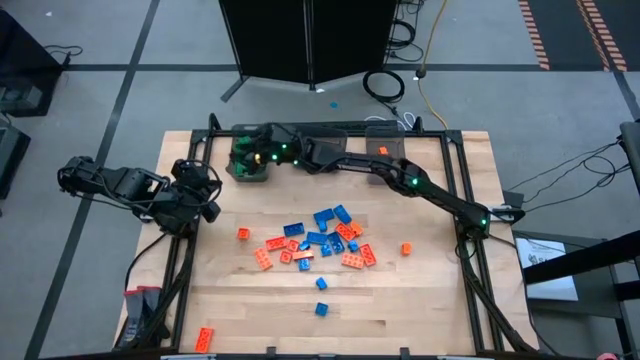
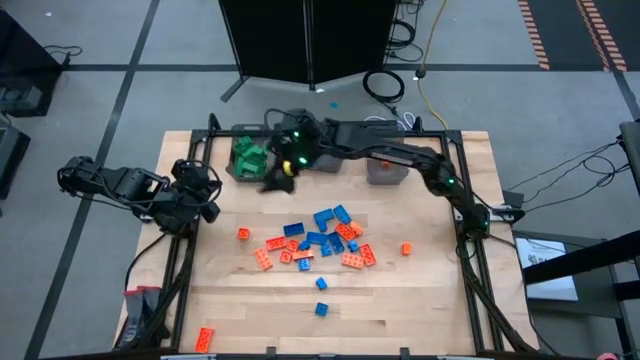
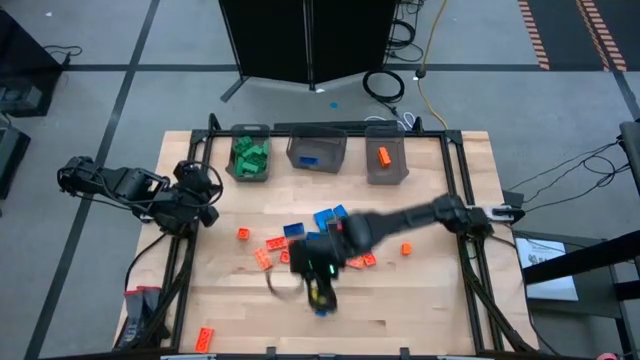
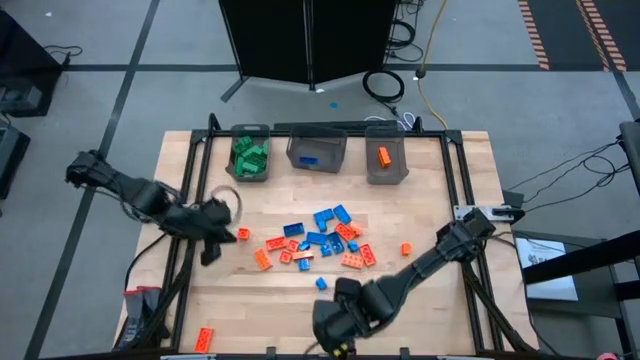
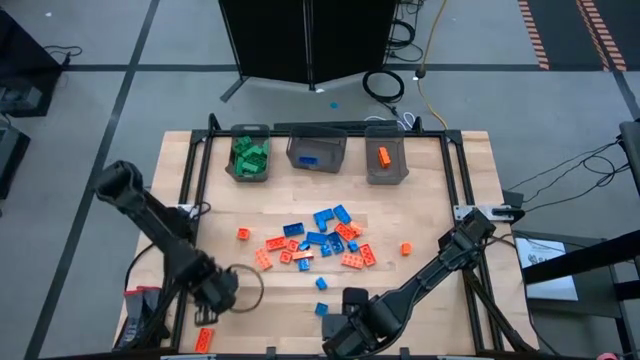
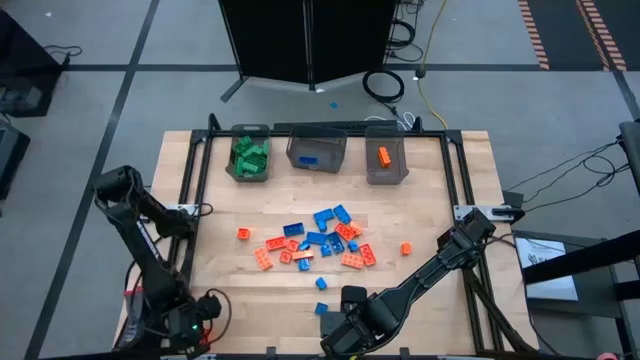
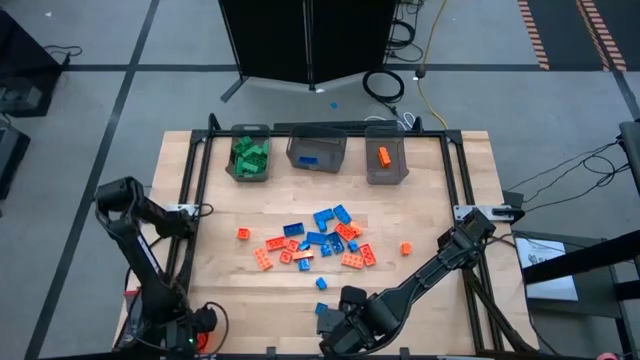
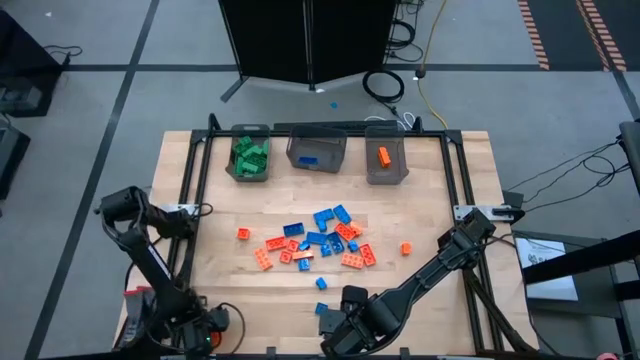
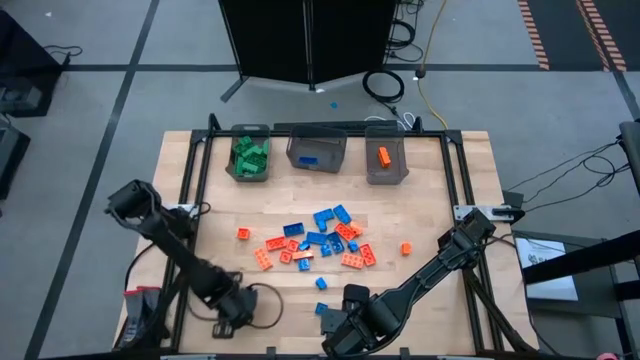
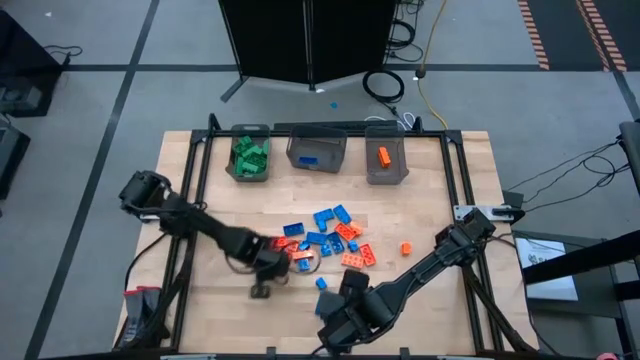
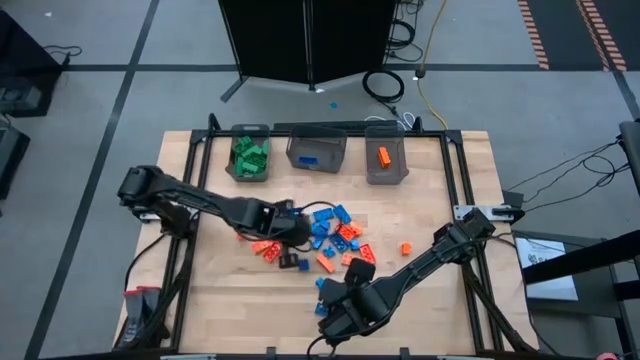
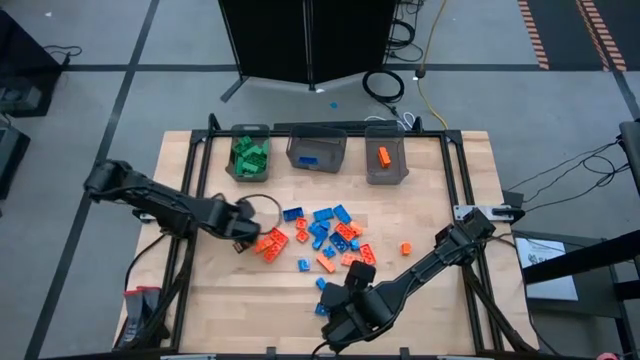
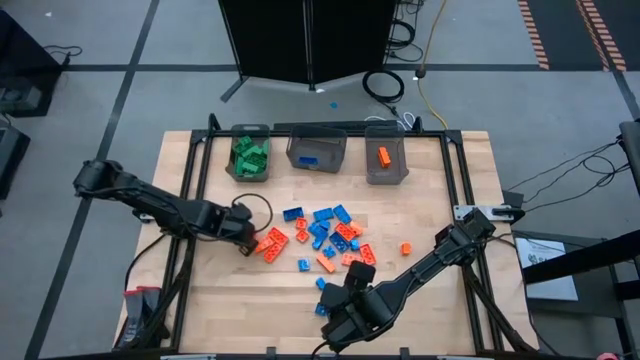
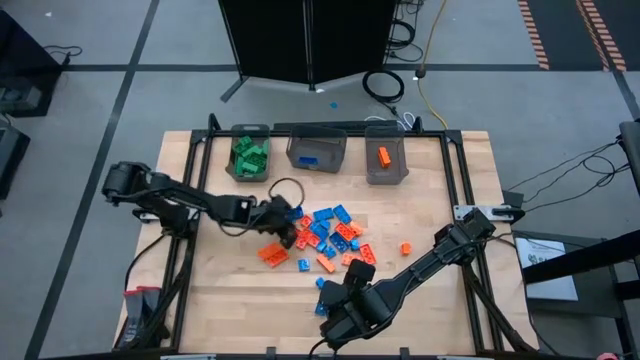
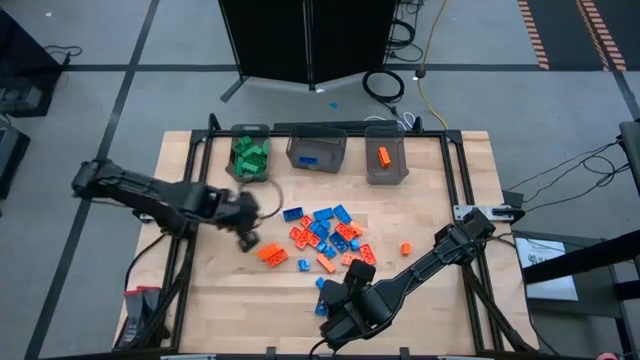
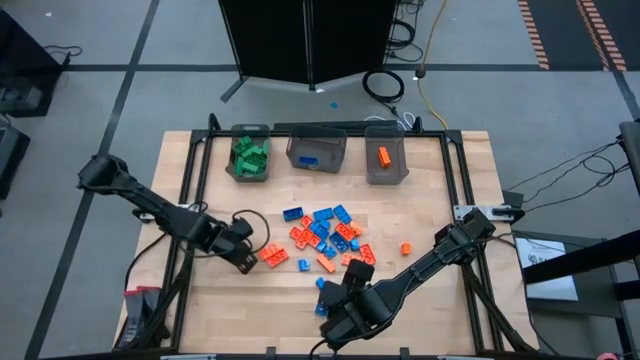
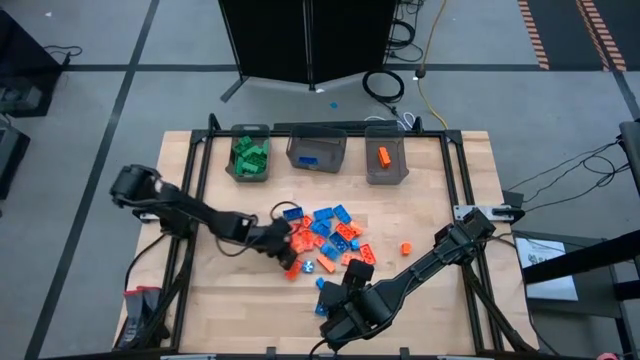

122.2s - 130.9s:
Task: Sort blocks
Adjust the game pieces on the table

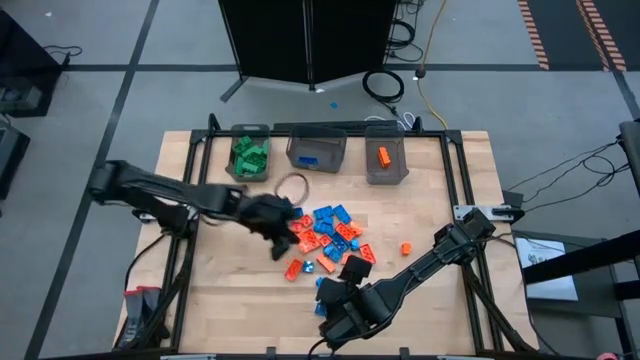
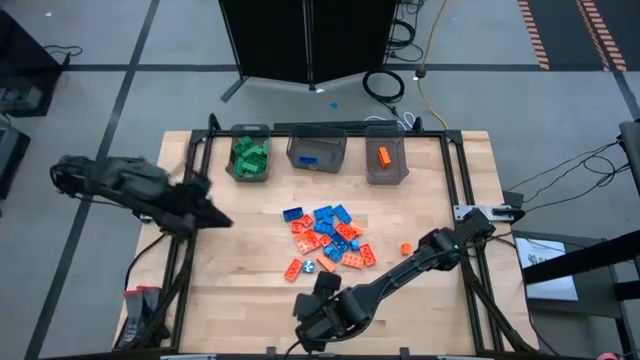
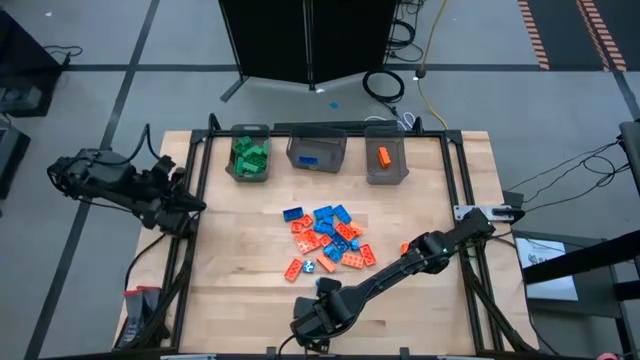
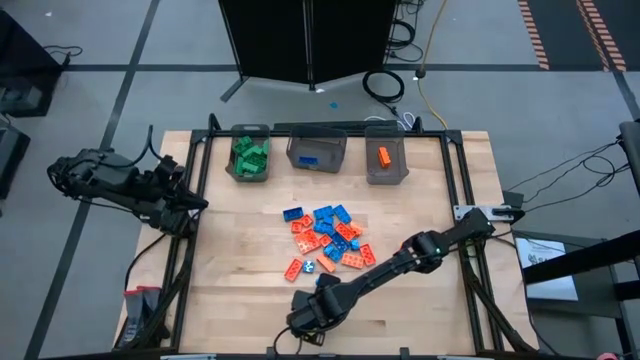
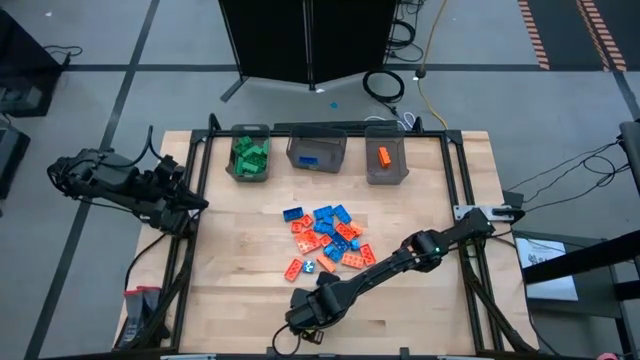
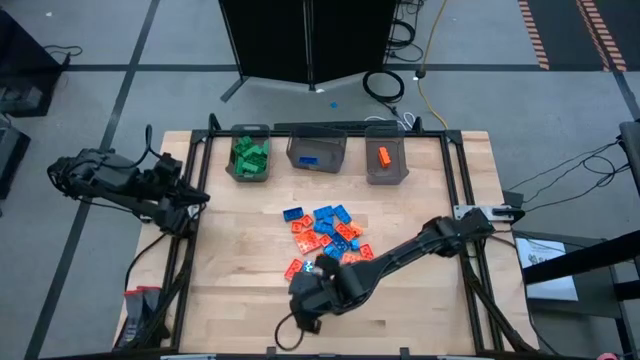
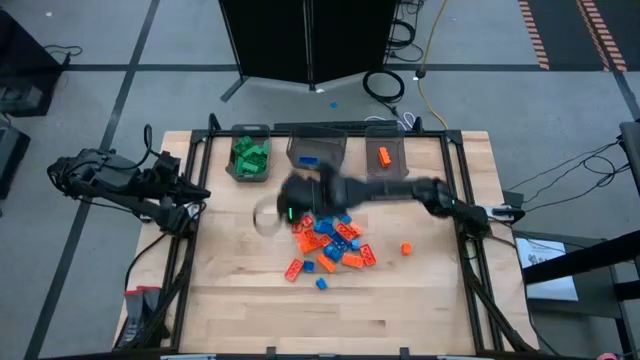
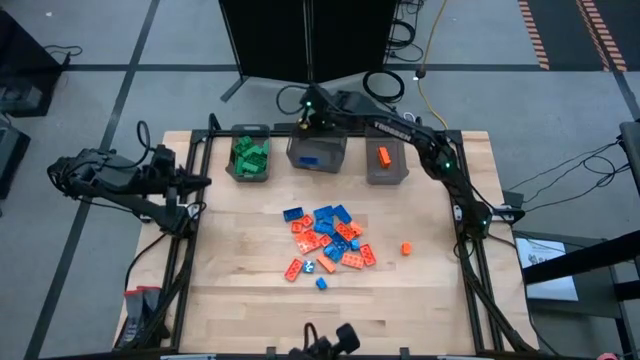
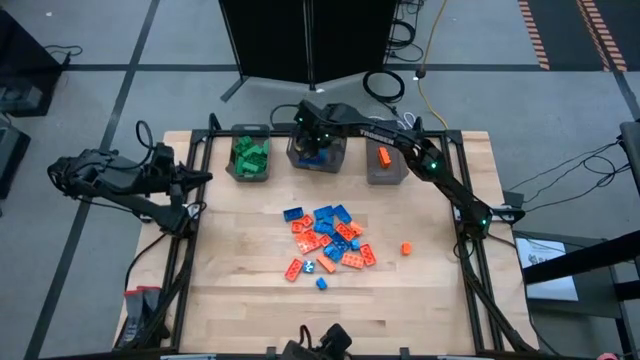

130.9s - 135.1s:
Put the blue game piece into the middle black bin

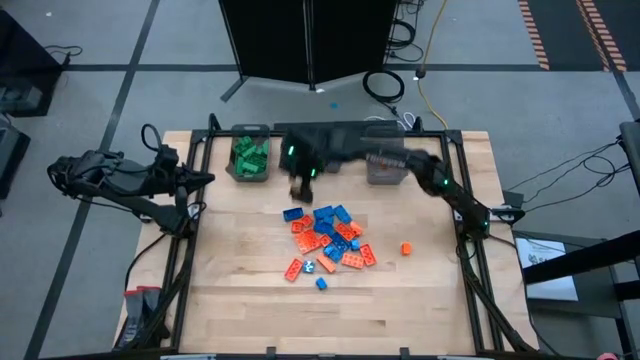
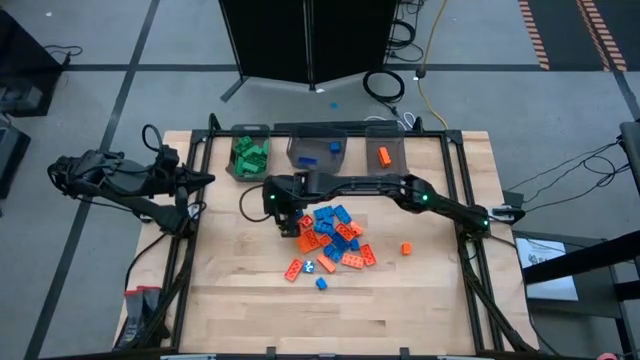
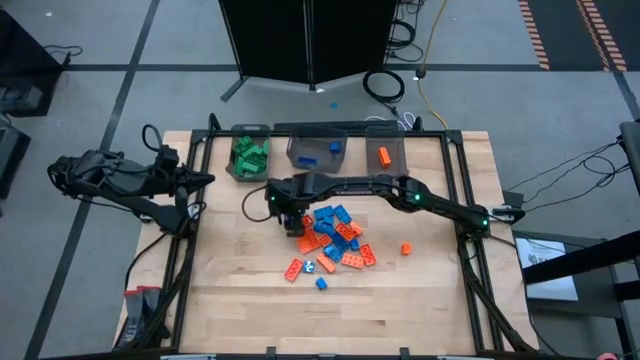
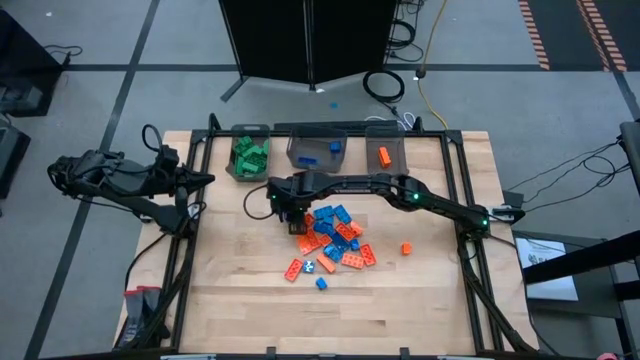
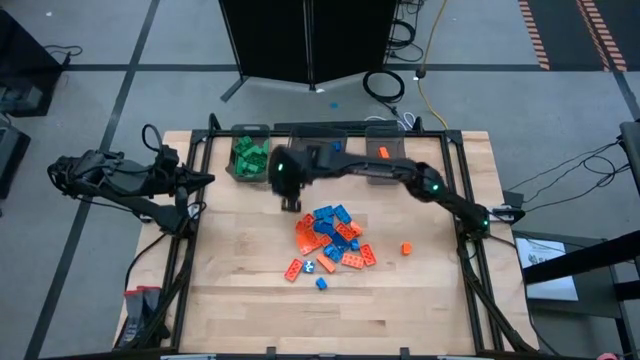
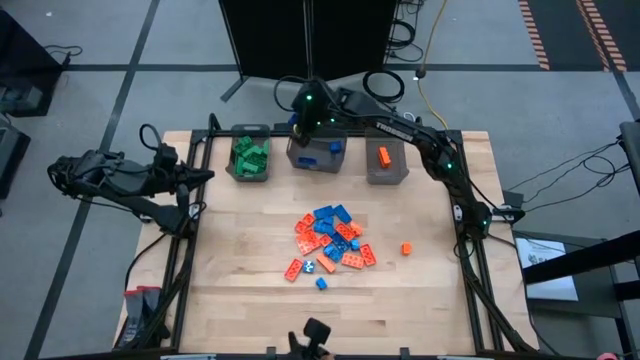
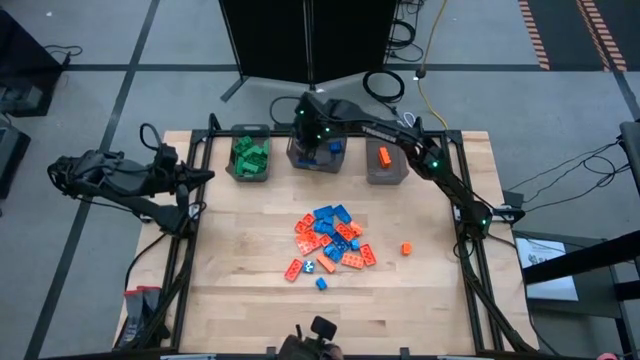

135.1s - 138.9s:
Put the blue game piece into the middle black bin

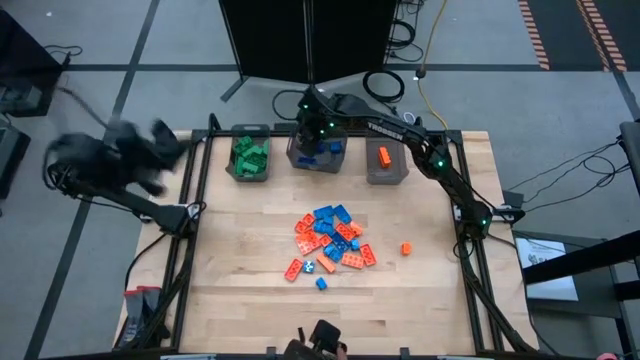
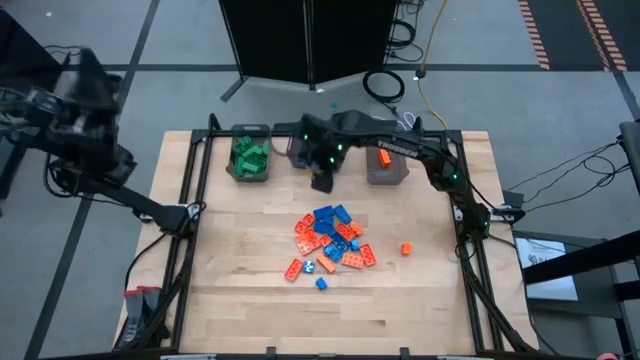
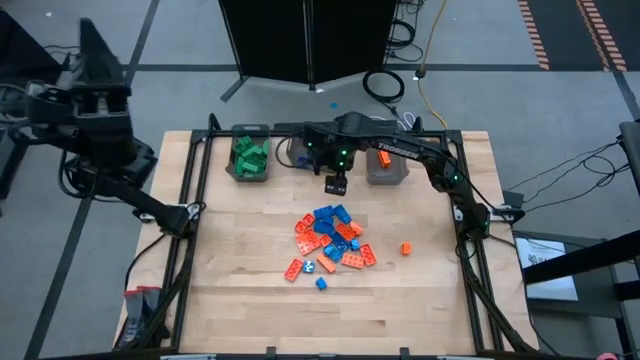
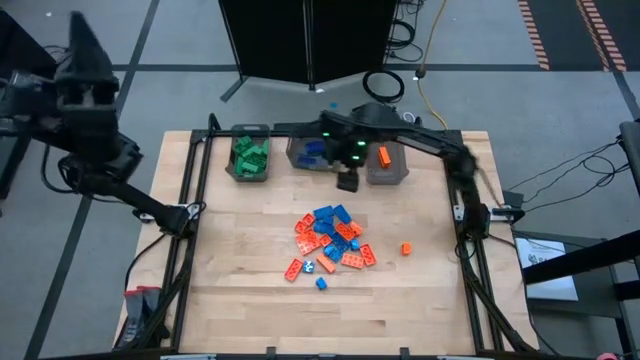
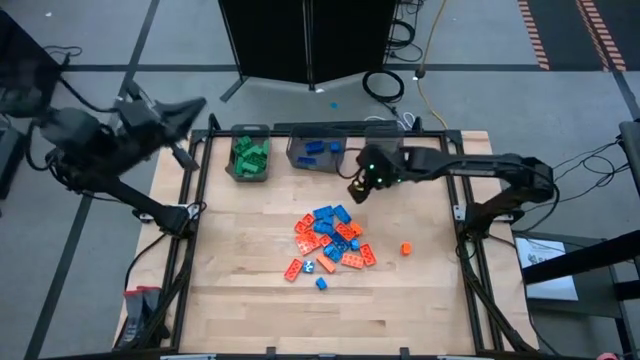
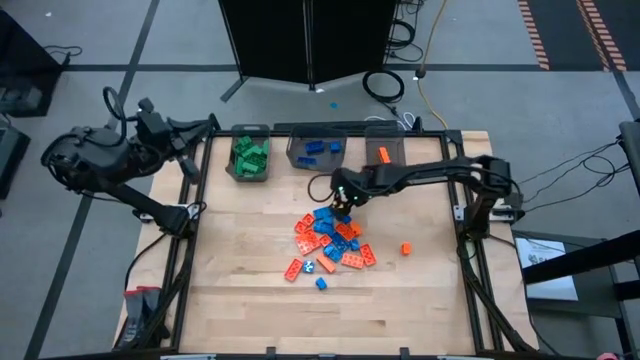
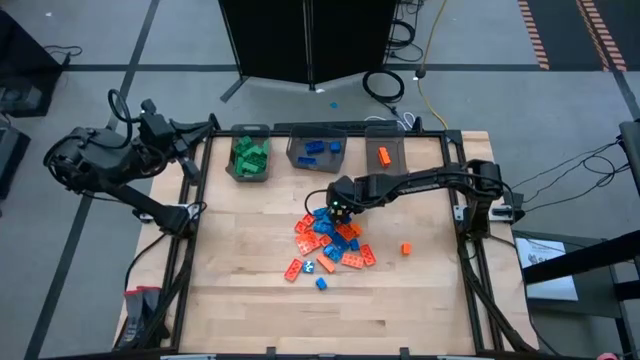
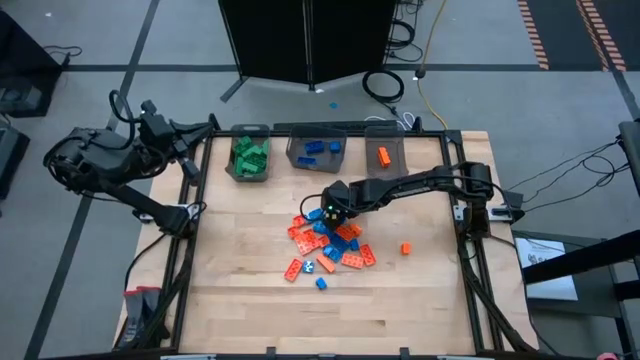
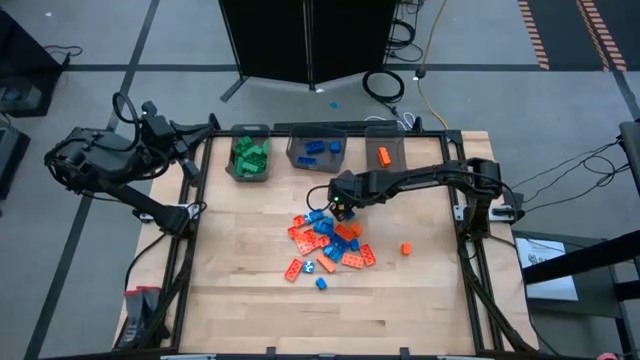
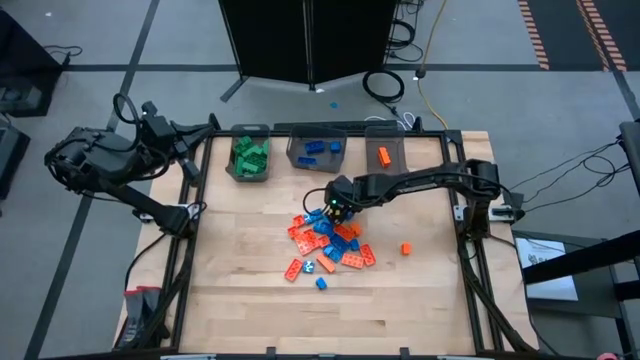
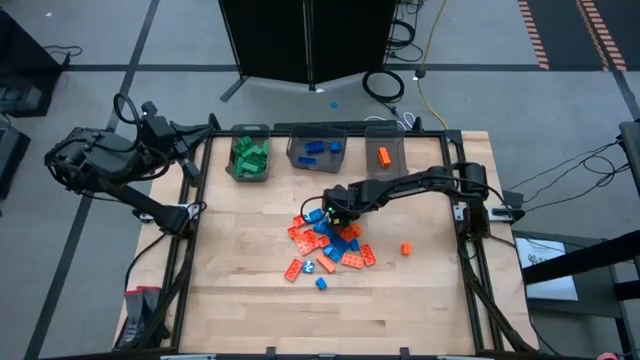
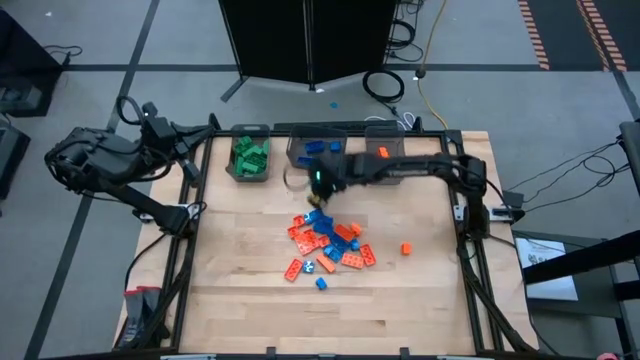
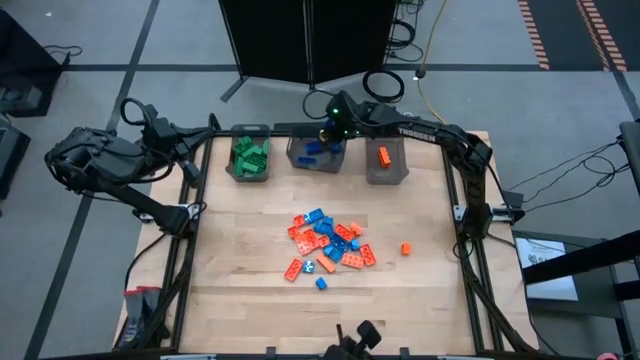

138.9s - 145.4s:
Put the blue game piece into the middle black bin
